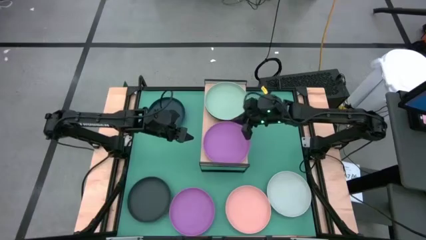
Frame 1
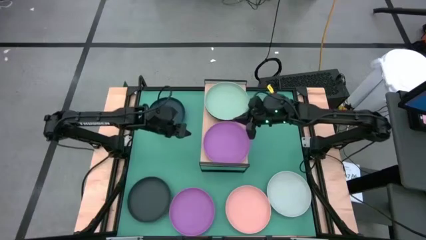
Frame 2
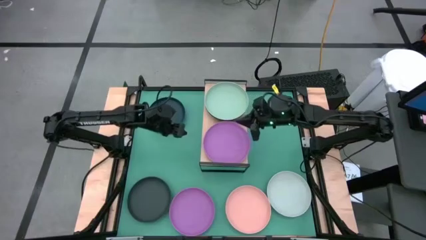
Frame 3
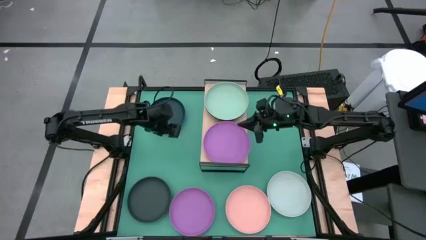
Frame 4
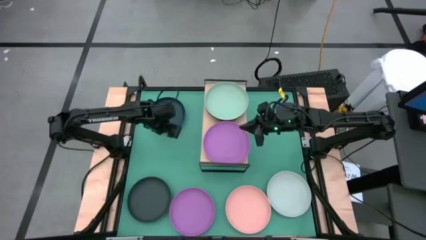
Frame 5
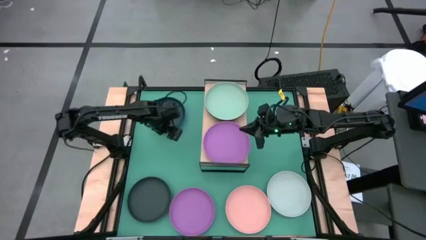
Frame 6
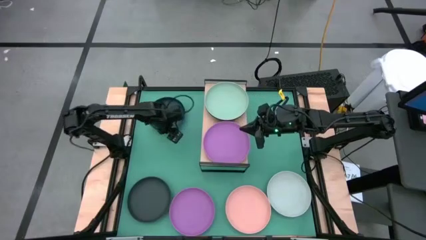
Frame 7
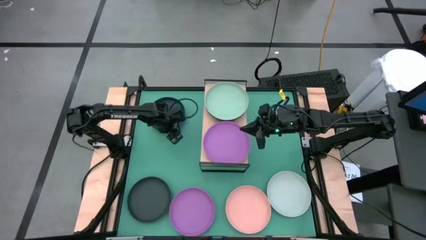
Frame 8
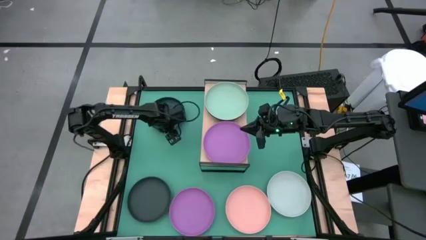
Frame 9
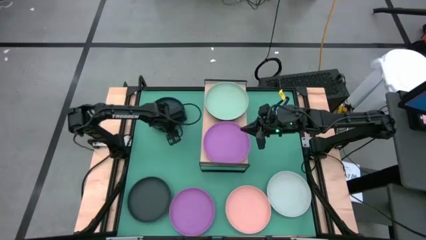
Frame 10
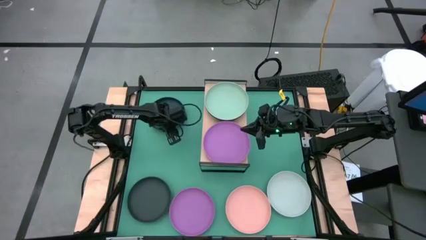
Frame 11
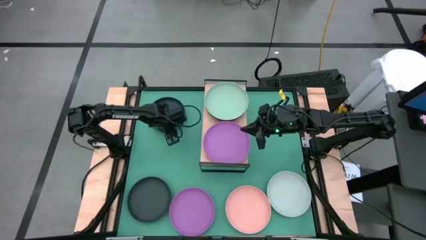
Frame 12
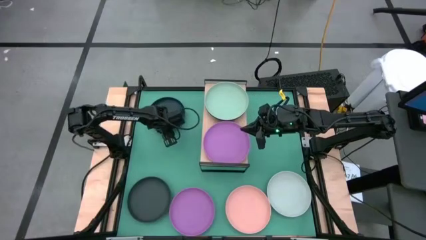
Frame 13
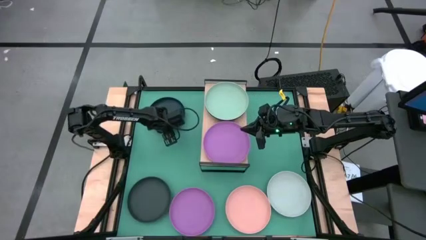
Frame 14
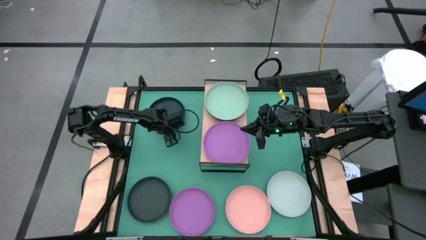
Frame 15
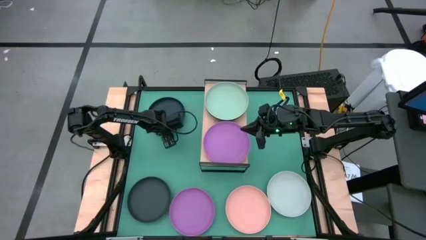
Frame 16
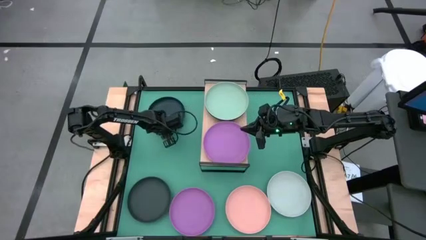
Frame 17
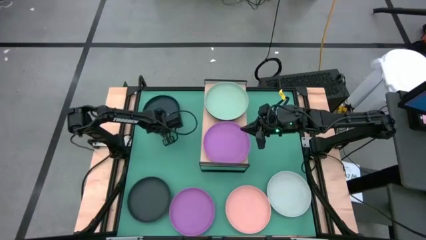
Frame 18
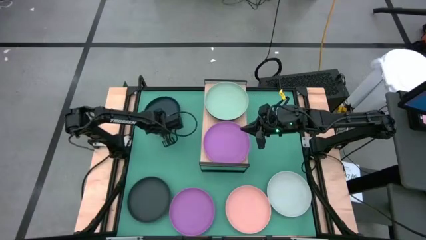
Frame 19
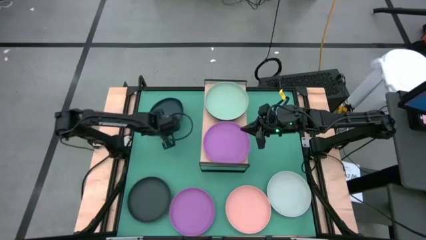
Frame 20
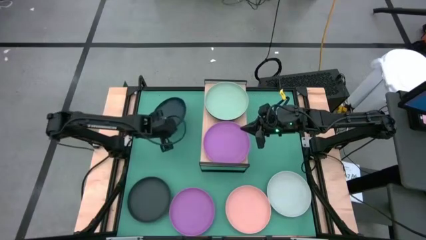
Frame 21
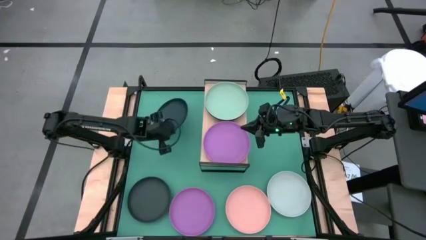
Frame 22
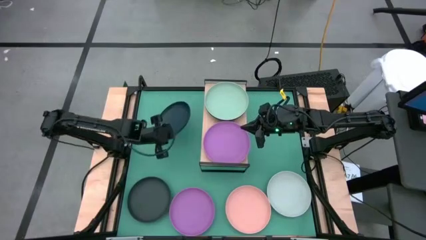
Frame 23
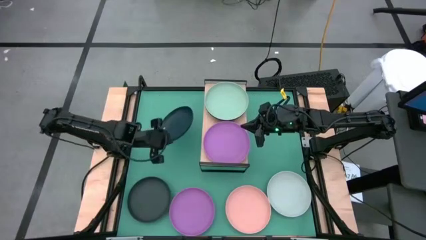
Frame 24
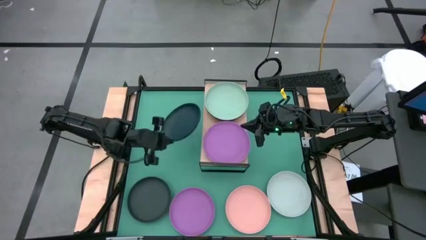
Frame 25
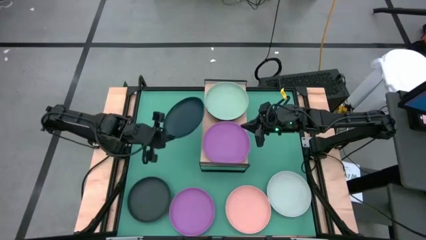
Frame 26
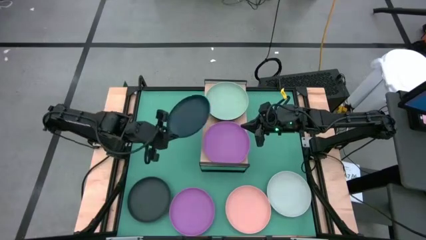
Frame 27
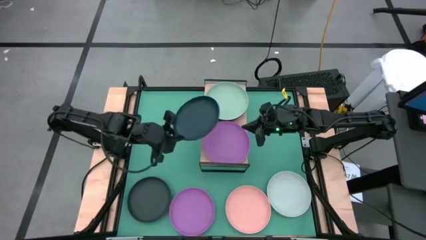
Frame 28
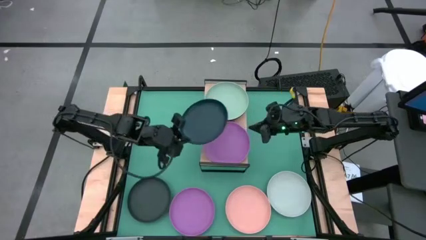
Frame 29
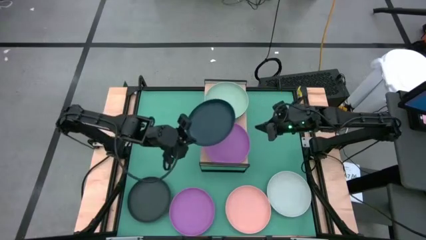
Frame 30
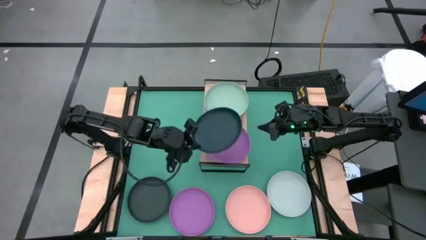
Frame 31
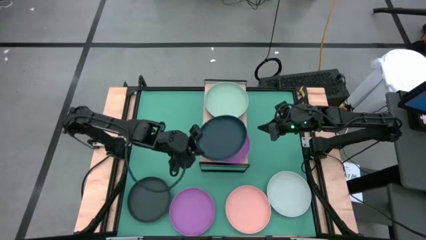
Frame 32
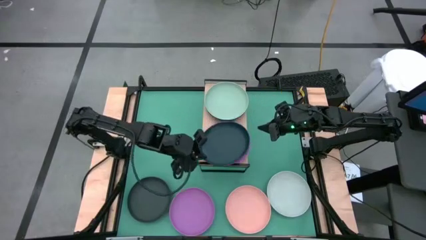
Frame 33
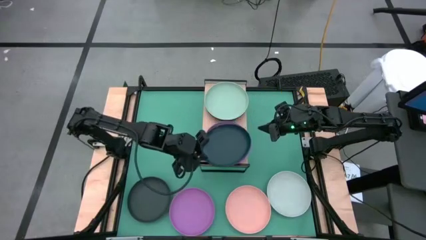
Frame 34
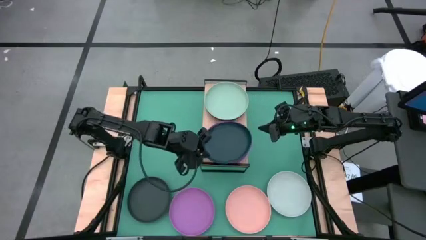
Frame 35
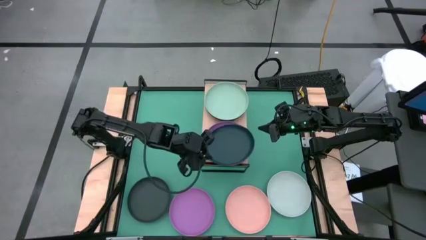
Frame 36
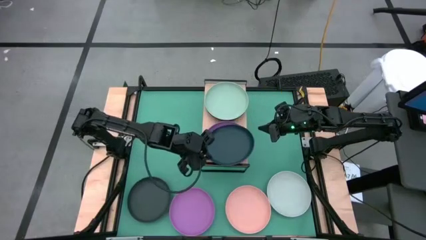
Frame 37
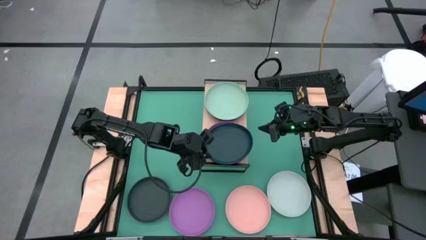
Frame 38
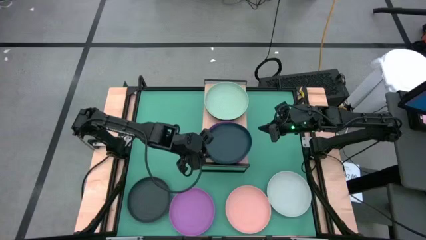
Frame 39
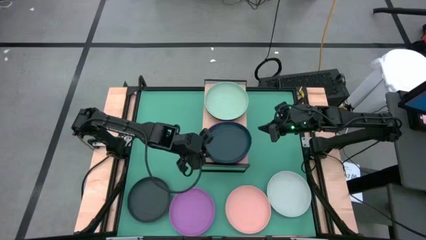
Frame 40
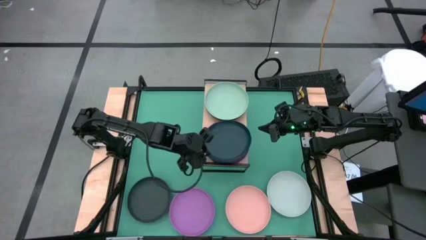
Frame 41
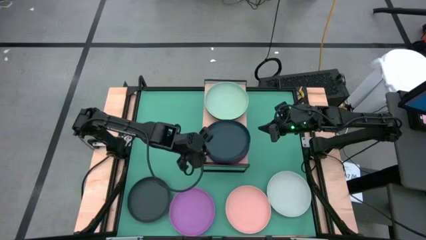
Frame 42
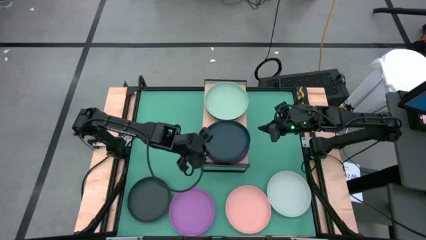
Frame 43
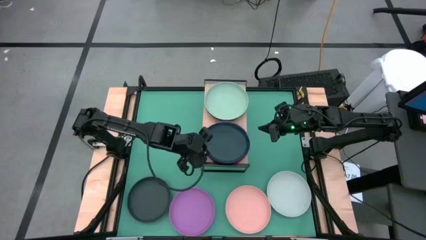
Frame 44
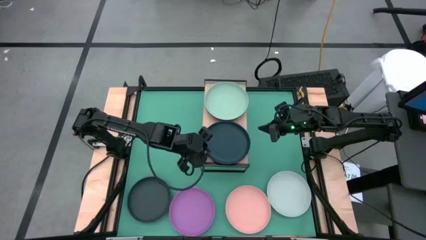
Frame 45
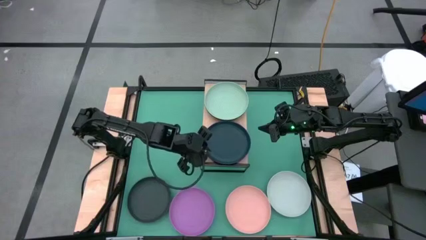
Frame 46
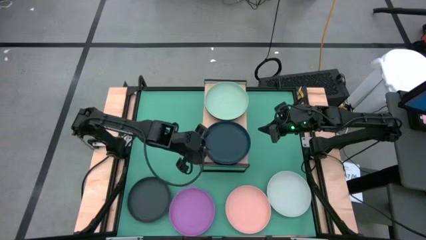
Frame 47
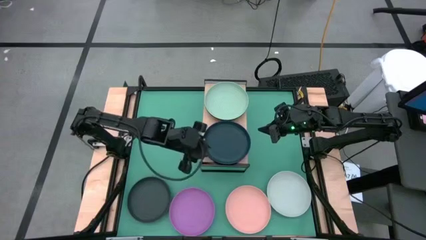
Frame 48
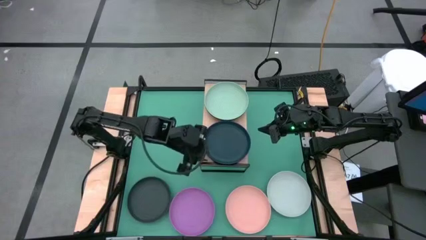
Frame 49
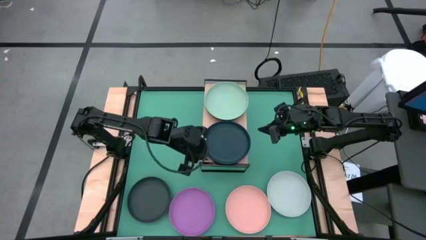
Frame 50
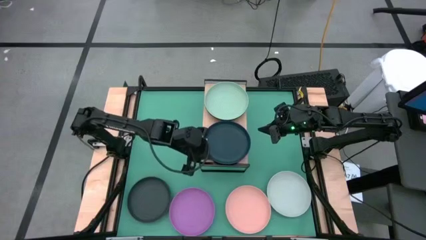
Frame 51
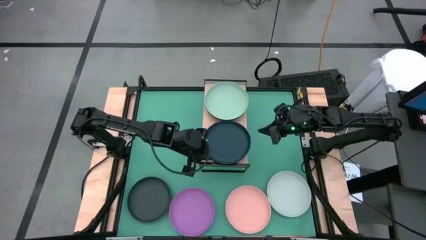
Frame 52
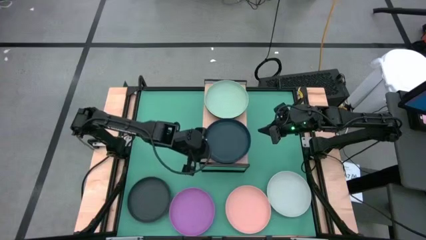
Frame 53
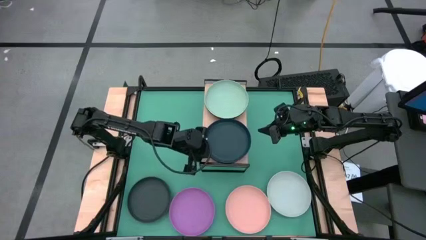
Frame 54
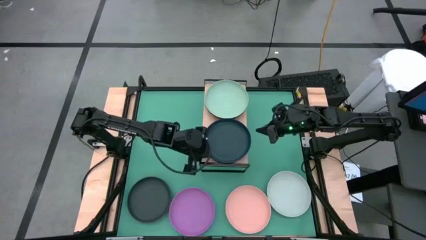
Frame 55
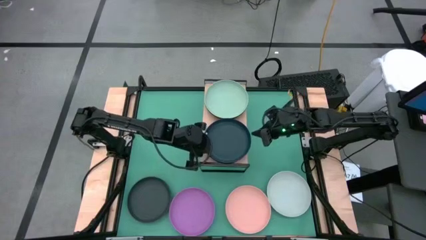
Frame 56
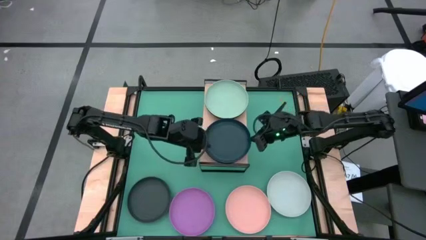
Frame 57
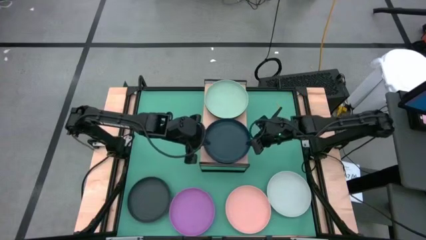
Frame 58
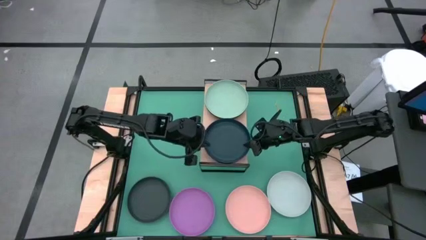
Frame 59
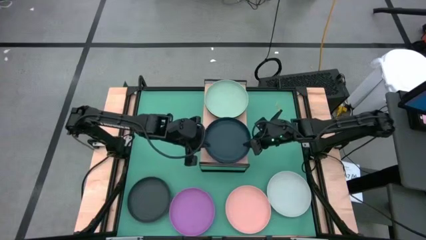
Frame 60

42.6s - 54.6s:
Task: Place and stack plates onto a shelf
Stack the top black plate on top of the purple plate

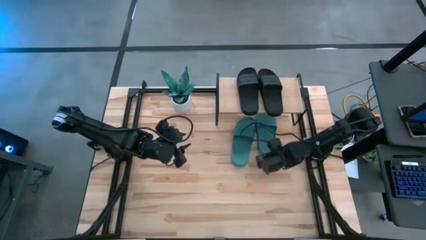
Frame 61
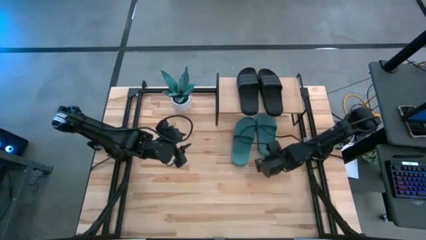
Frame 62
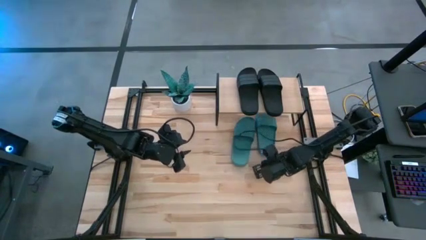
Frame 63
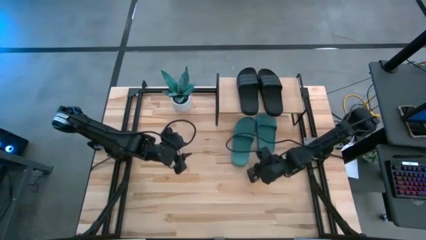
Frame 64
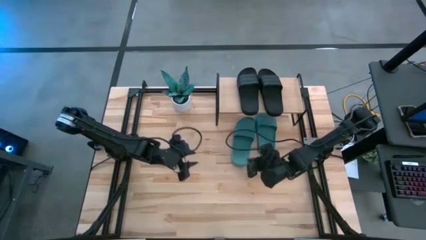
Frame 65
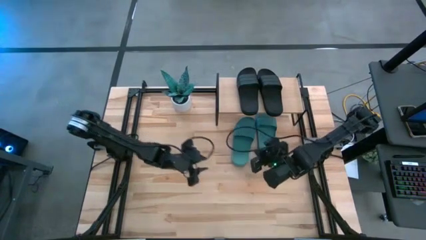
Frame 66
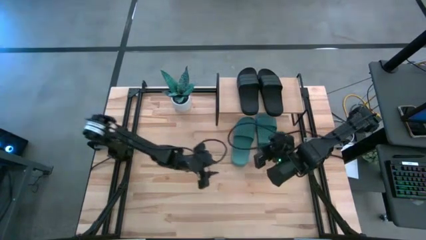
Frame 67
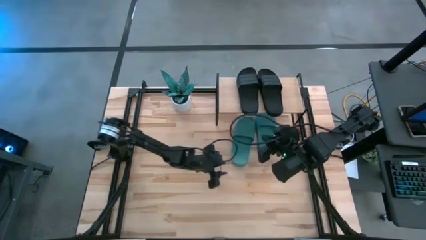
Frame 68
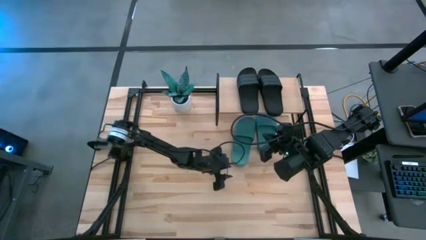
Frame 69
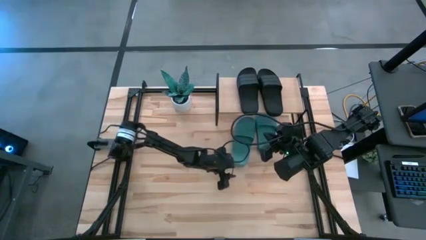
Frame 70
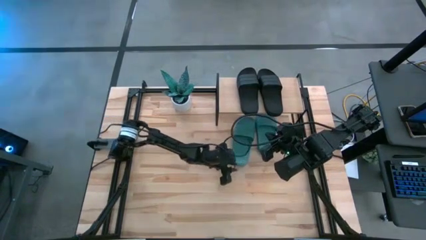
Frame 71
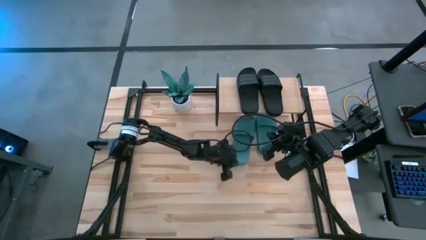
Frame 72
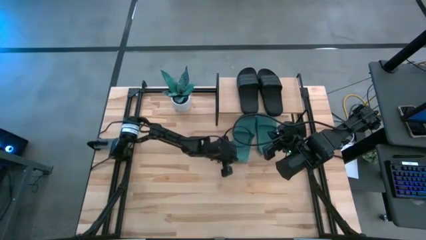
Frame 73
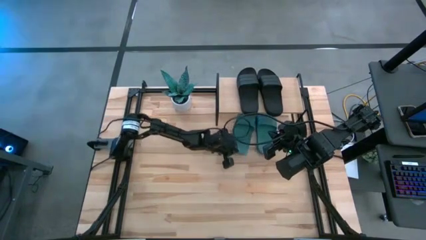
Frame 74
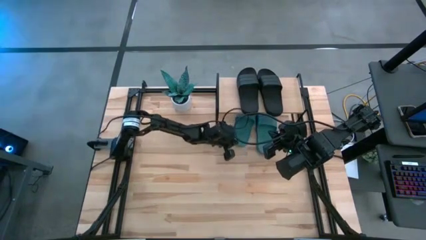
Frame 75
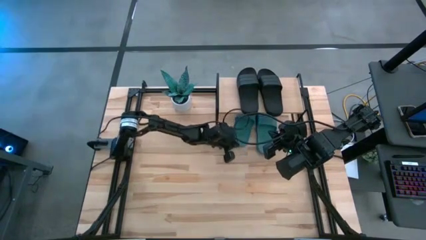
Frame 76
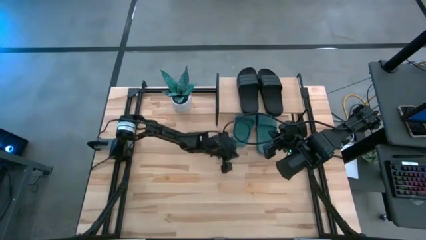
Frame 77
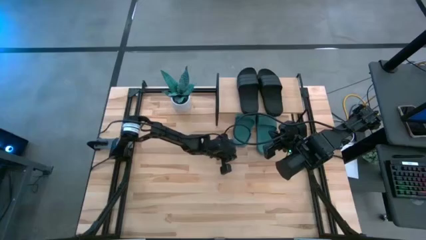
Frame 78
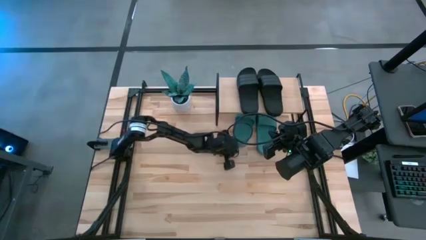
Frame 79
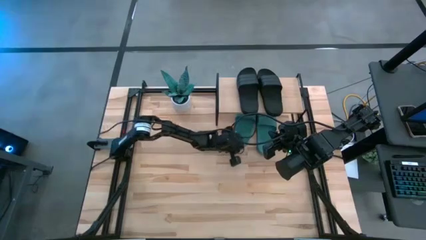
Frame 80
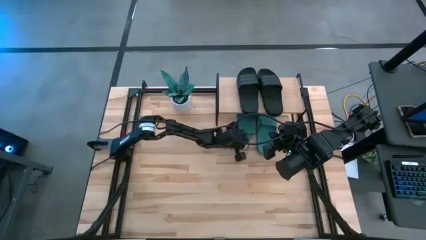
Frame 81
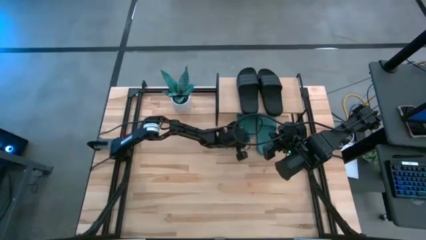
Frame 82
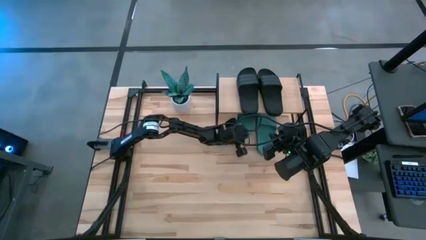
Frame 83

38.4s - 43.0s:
Task: Pick and place slides into the shelf
Move the left green slipper under the shelf

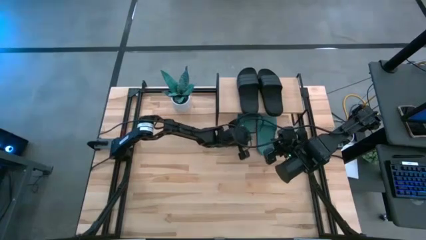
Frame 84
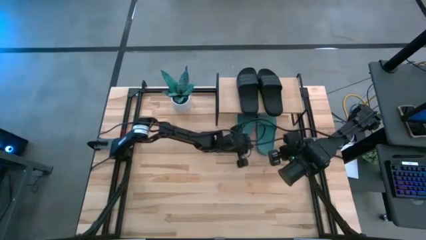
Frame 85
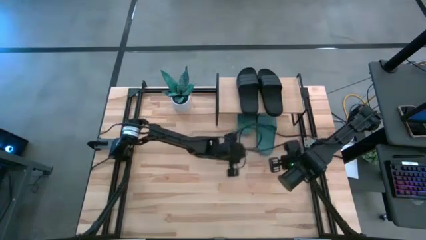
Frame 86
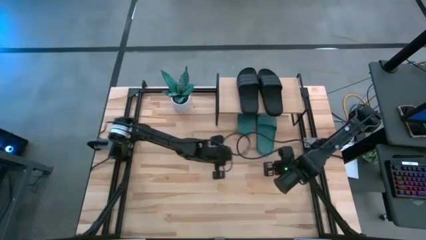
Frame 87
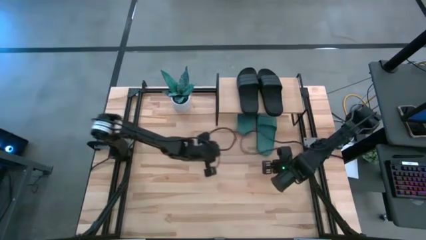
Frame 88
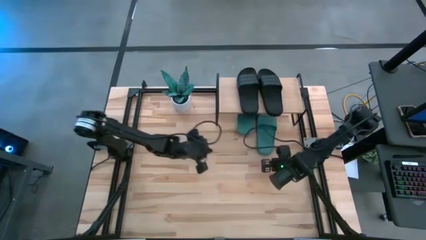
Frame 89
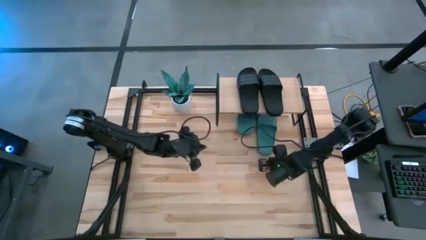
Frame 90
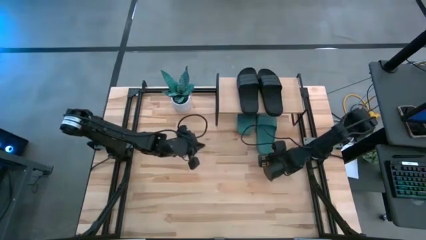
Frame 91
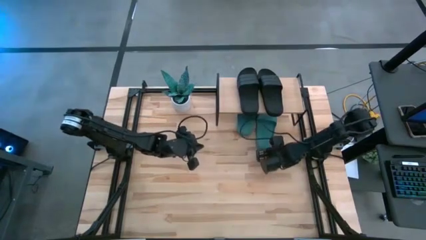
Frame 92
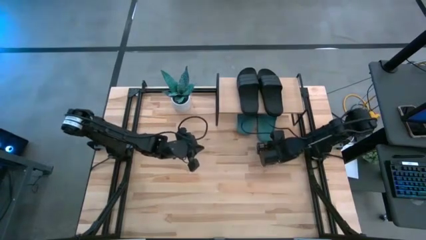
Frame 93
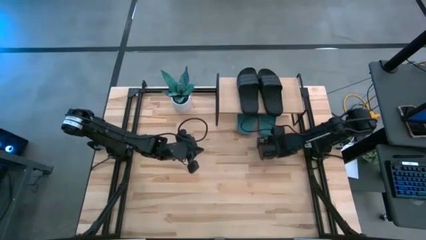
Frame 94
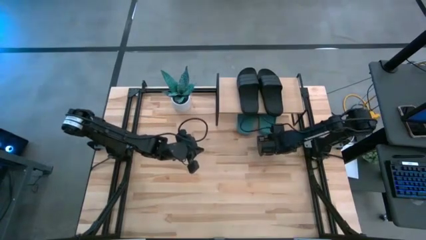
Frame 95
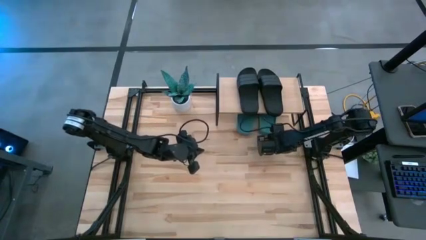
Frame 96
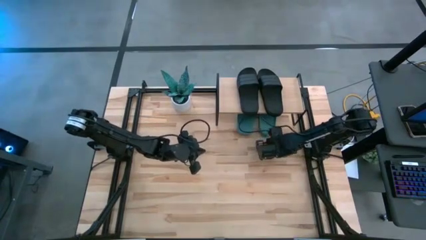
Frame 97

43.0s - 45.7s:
Move the right green slipper under the shelf
